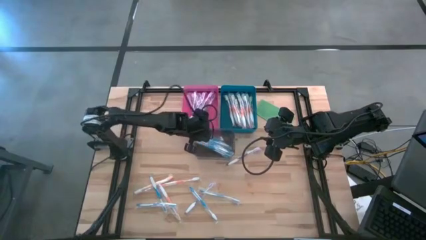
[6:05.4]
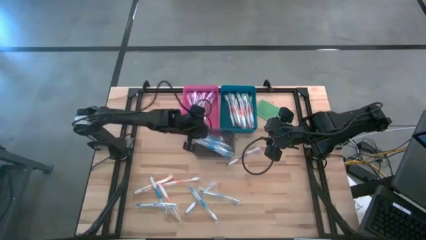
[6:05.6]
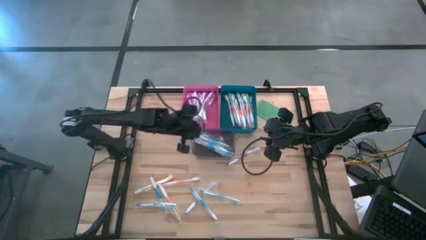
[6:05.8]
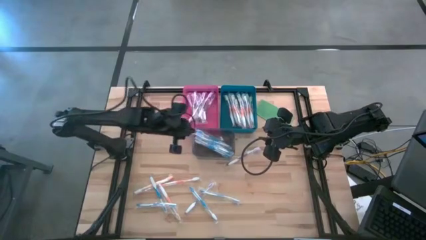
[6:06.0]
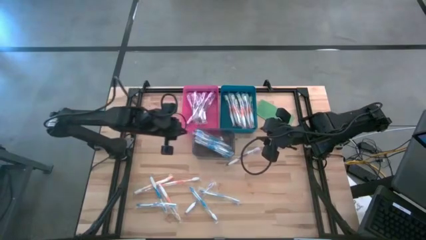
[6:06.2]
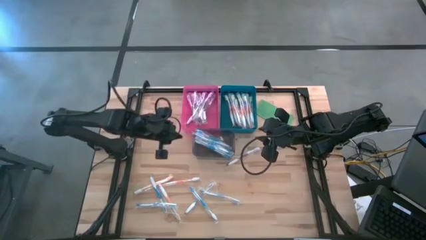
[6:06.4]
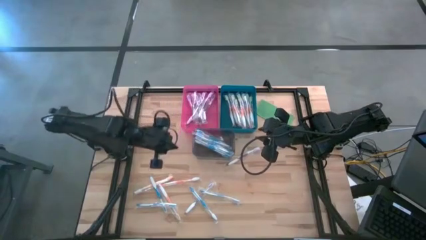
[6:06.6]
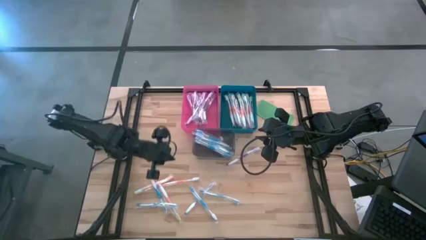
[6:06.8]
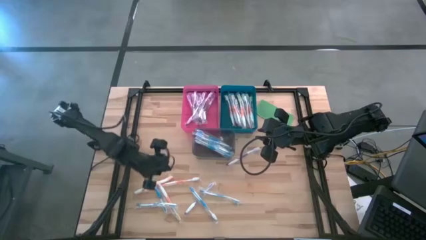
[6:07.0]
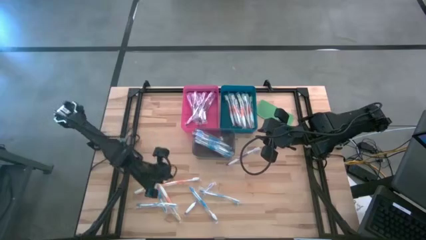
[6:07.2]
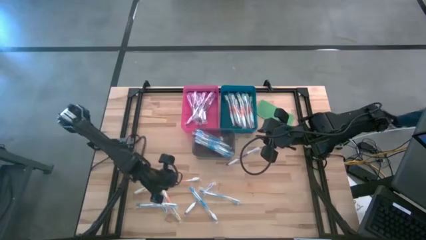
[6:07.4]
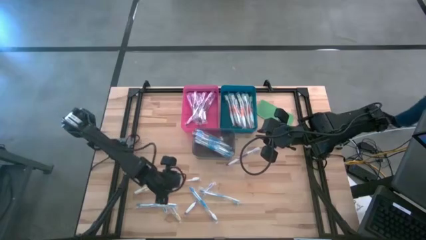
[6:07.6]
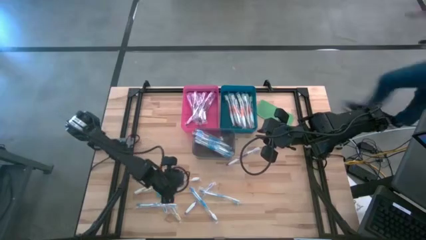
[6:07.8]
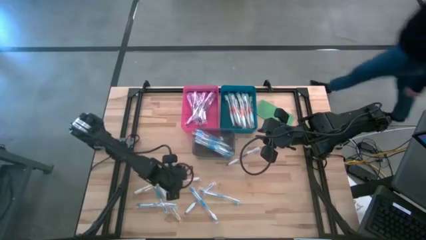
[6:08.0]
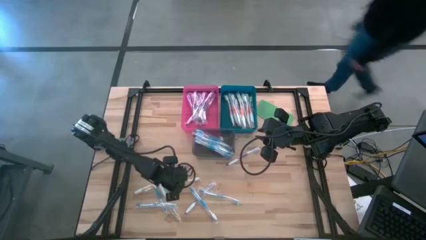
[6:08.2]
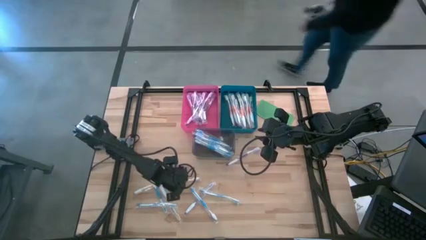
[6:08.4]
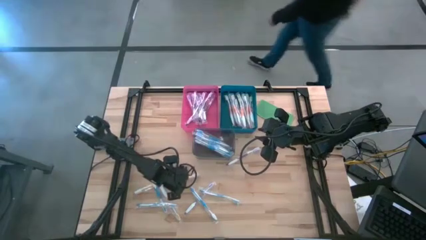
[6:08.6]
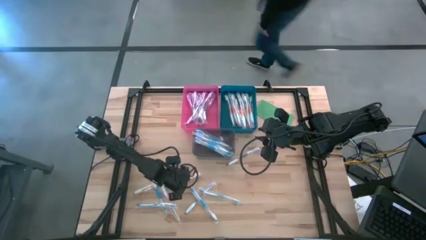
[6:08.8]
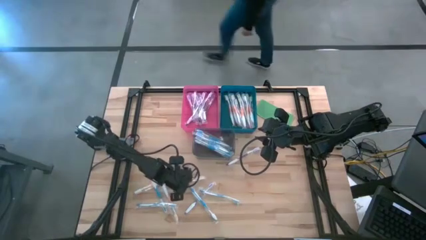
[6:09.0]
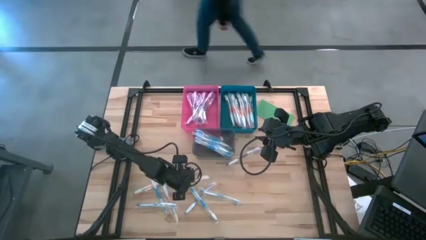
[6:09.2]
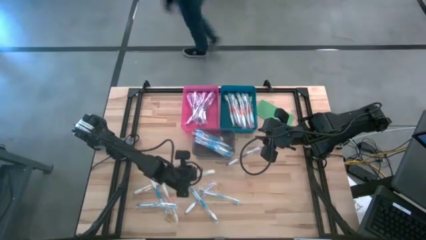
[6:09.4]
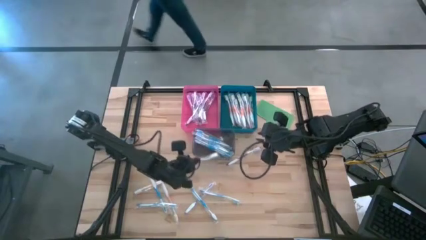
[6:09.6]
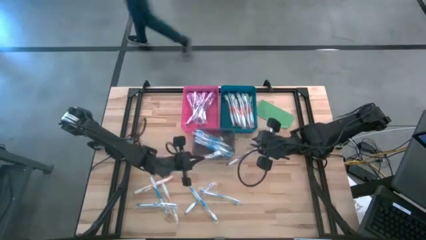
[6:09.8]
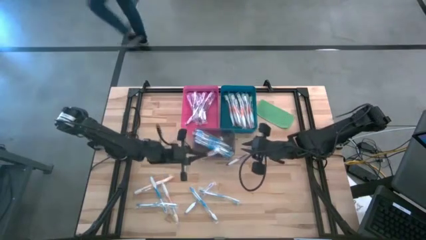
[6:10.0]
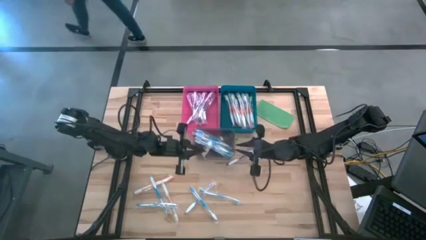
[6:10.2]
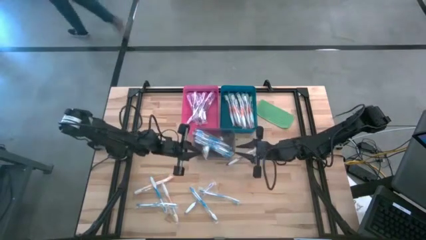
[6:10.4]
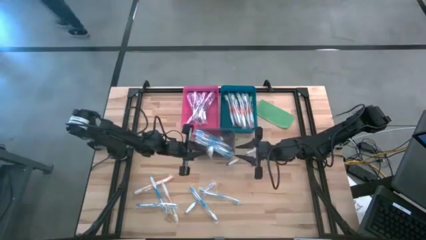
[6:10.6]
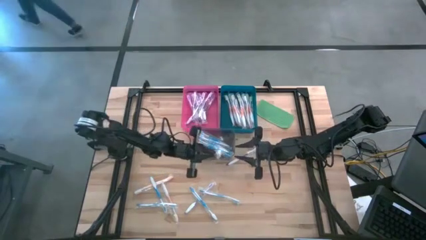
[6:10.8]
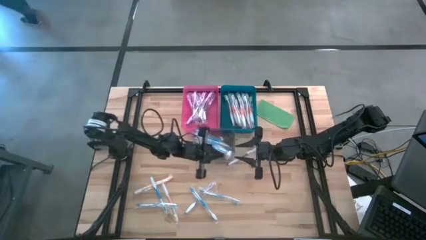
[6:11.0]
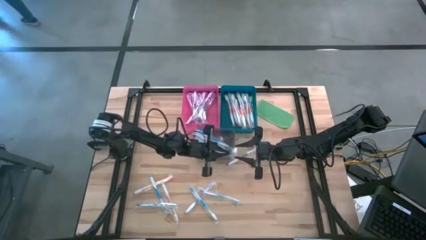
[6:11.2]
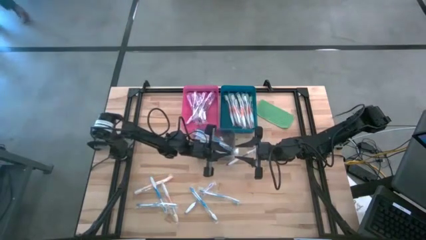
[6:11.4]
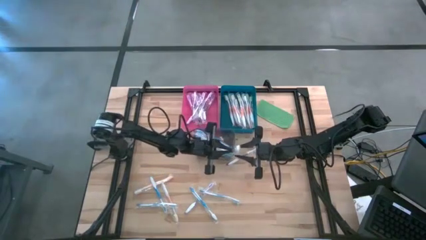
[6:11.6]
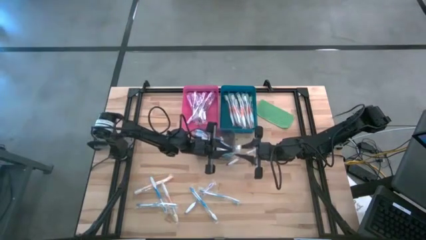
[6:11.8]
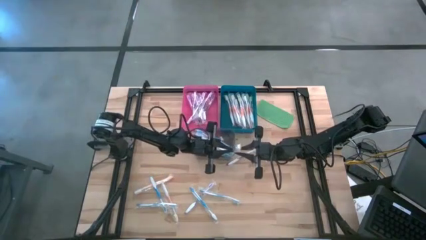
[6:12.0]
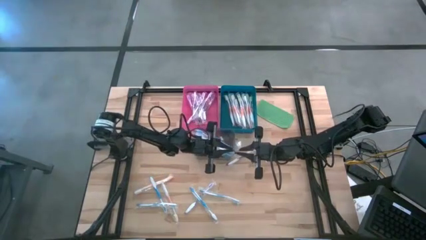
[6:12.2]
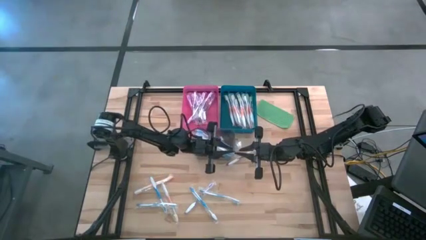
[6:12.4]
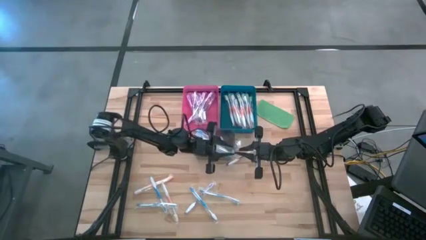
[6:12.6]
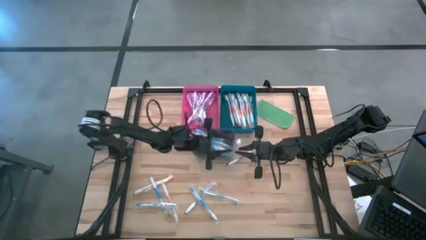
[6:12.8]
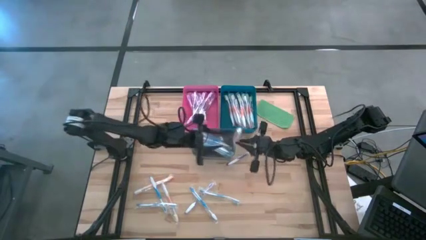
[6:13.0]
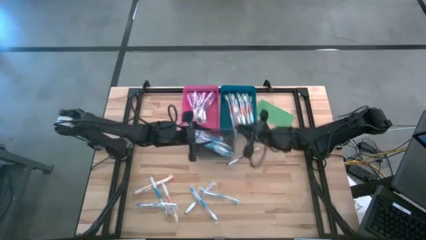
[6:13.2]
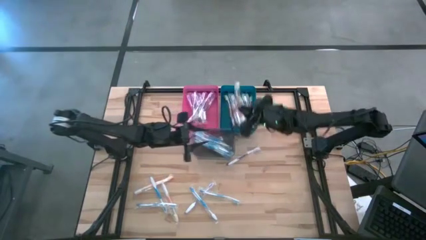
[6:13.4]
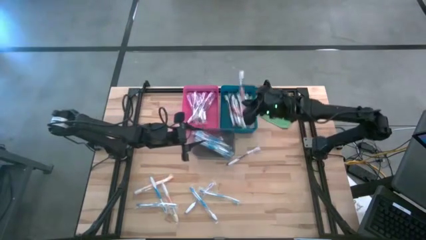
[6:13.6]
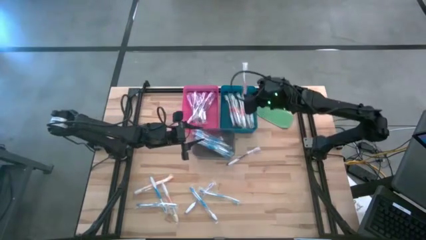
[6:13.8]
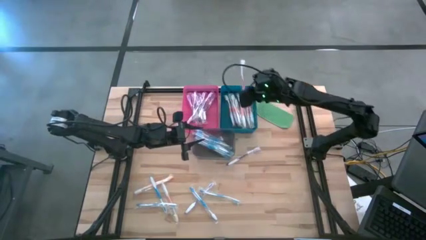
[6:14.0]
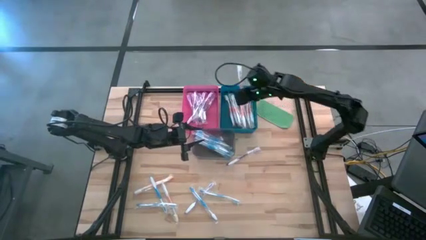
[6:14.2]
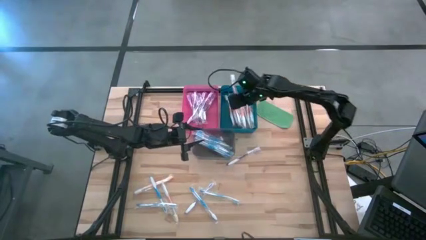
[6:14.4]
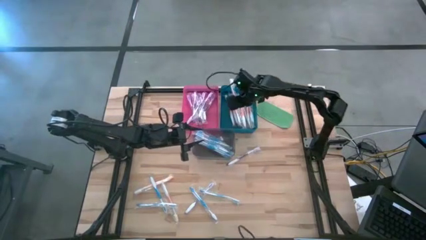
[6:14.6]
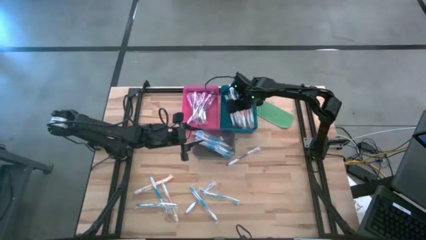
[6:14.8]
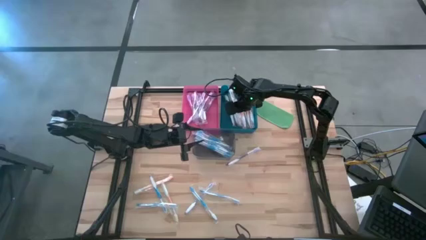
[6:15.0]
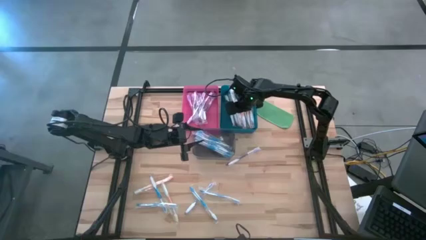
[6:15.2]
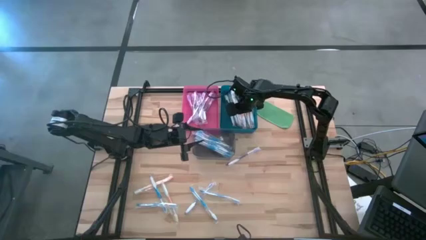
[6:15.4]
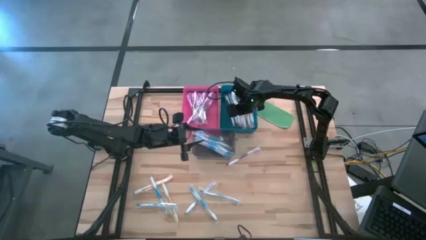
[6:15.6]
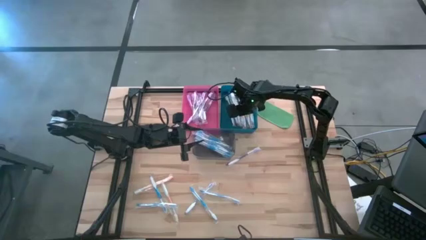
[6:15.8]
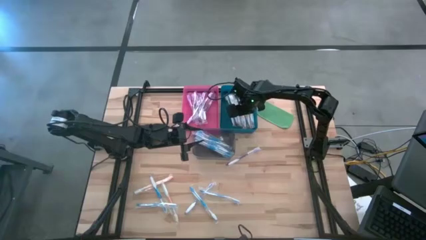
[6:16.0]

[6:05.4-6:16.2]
Task: Pick & Place Toothbrushes
Put the orange toothbrush into the blue bin

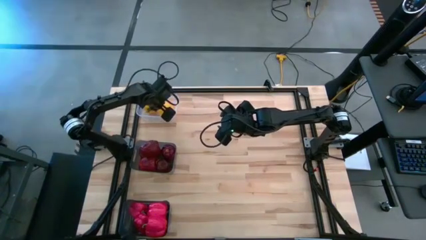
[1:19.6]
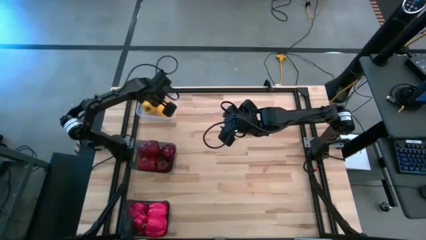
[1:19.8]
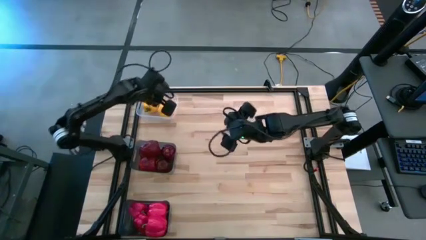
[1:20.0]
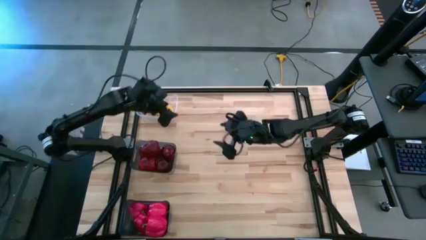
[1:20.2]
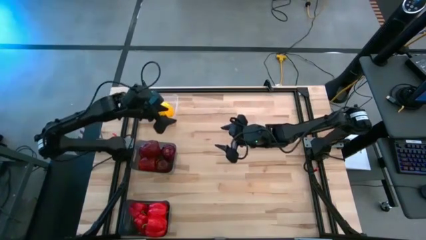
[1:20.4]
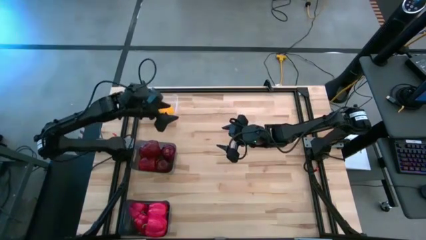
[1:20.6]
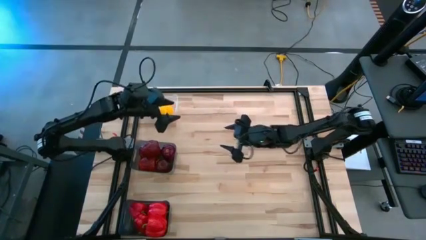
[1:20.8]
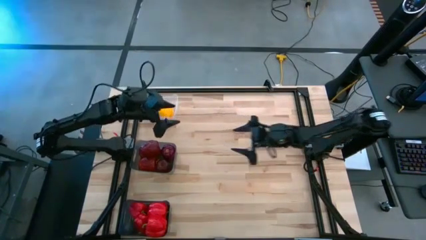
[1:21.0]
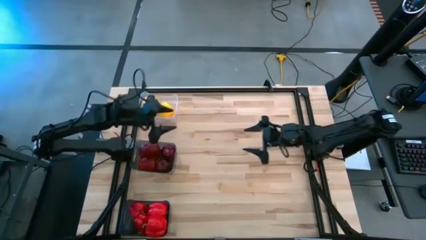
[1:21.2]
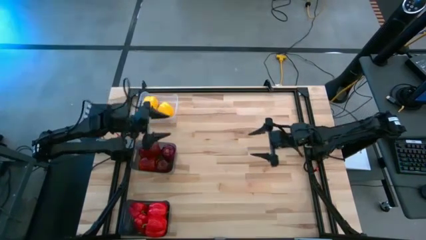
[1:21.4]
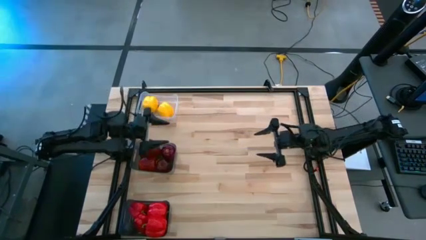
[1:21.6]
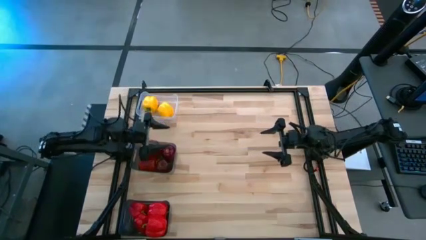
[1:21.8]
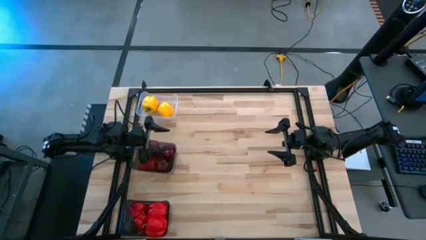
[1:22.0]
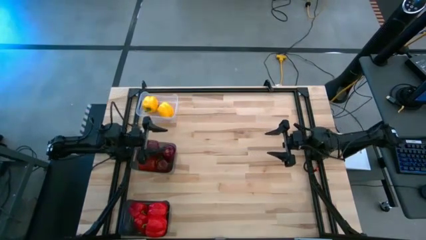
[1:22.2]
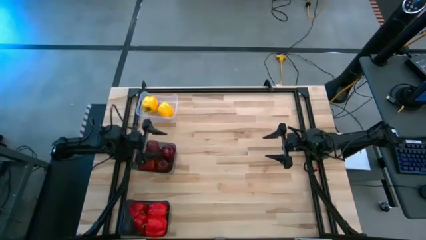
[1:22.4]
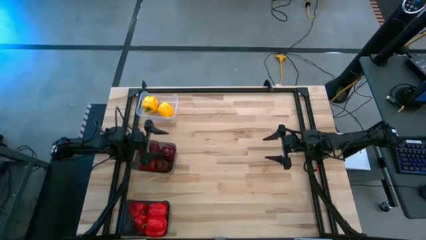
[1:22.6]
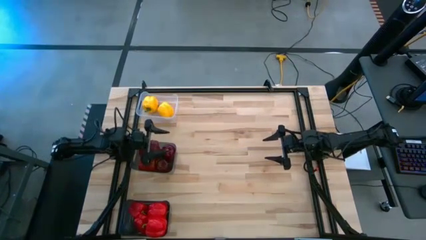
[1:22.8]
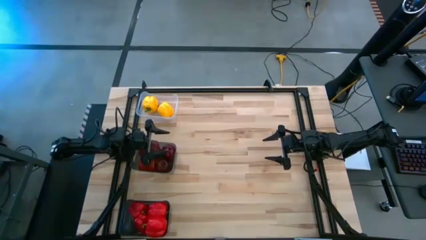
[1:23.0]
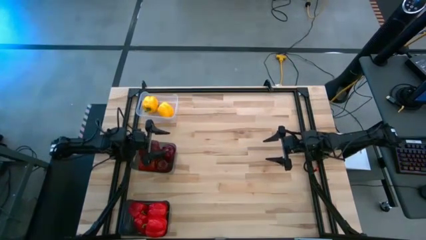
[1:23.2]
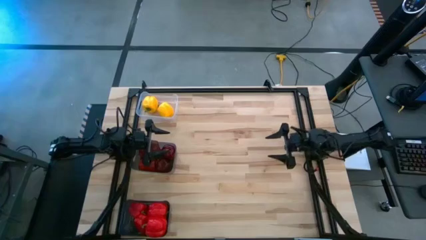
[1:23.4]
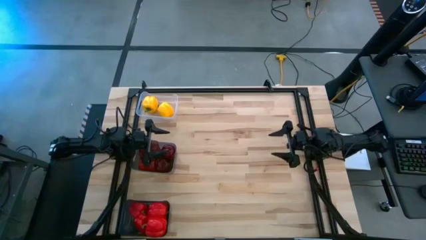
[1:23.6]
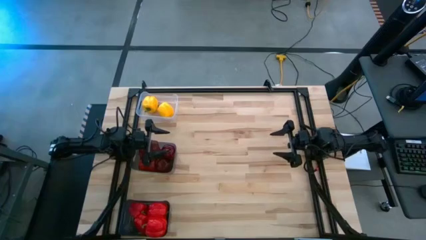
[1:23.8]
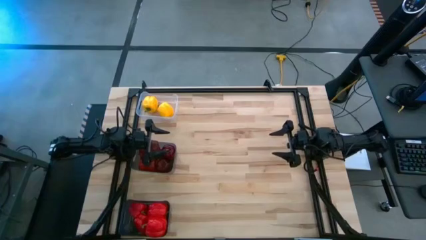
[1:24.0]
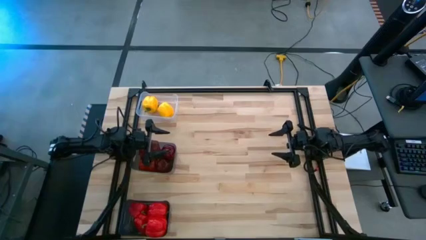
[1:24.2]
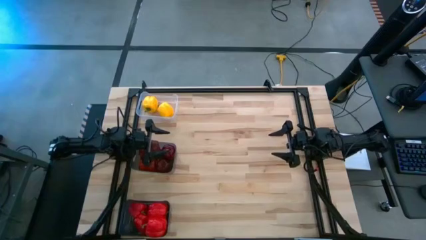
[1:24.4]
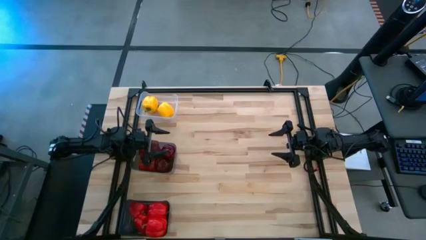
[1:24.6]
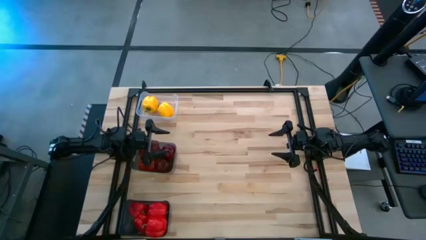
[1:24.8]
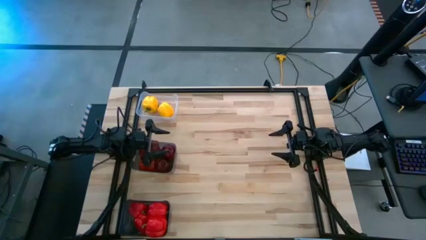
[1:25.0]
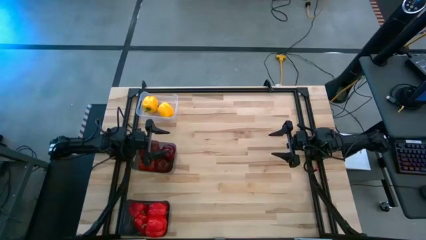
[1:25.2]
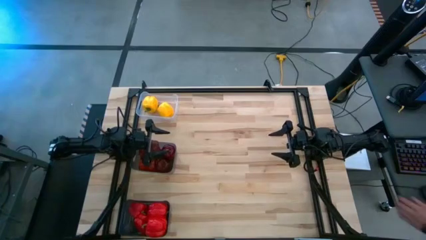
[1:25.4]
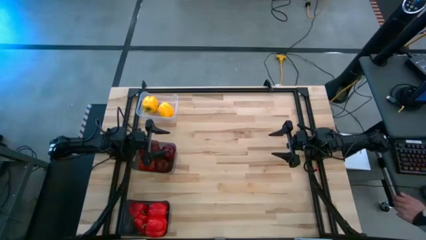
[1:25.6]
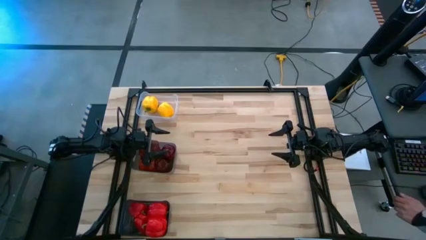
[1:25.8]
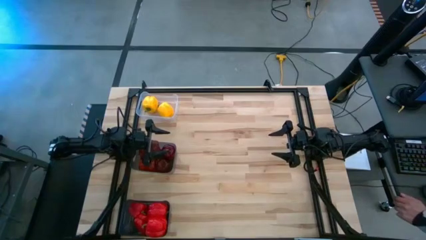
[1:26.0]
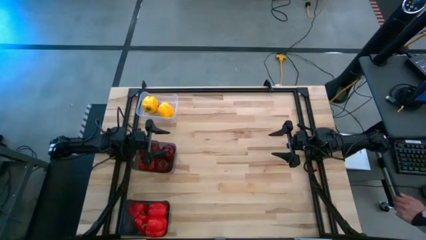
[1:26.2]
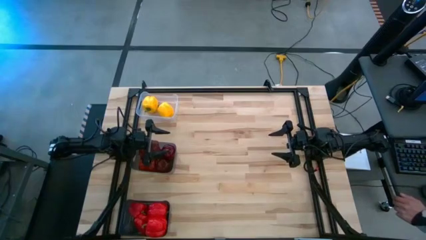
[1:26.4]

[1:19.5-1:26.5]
Task: Sort produce into baskets
Return to Home Position
